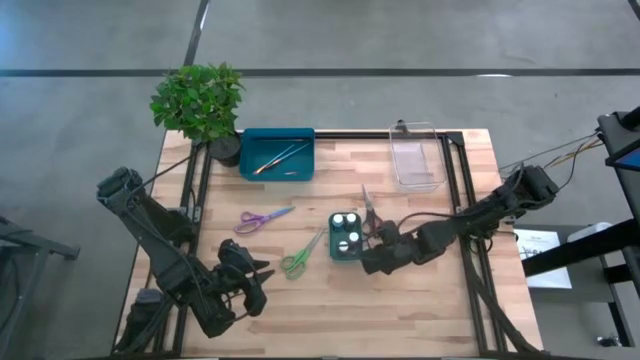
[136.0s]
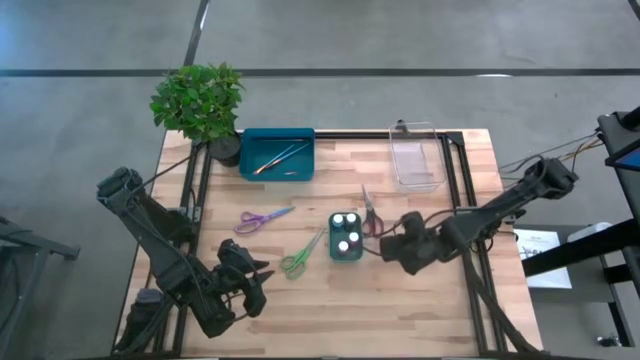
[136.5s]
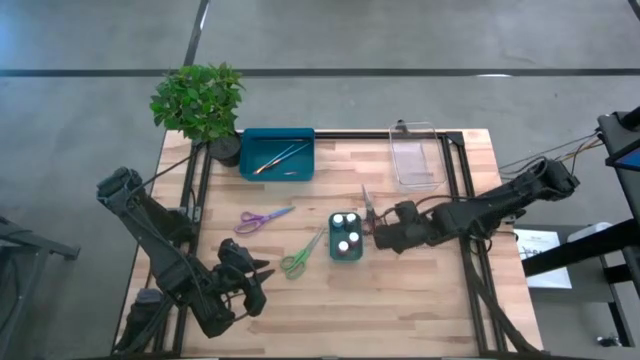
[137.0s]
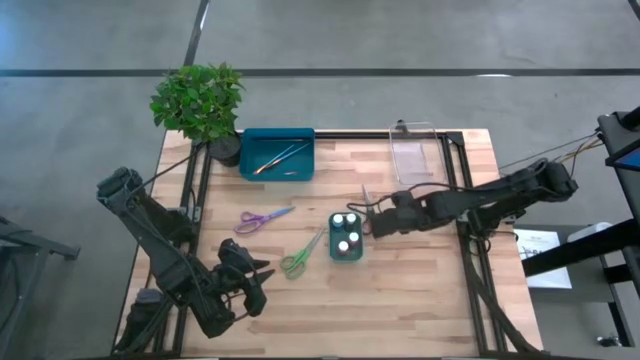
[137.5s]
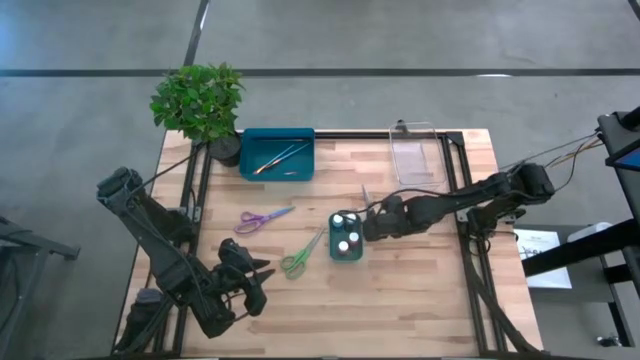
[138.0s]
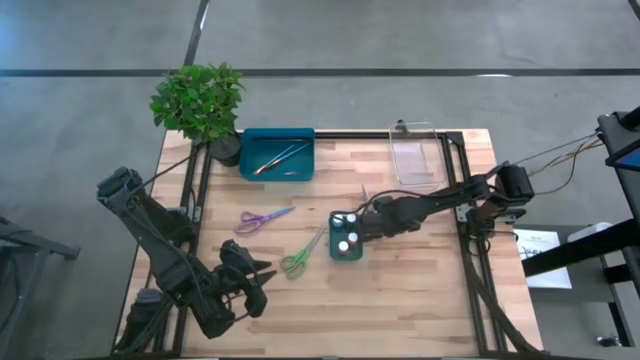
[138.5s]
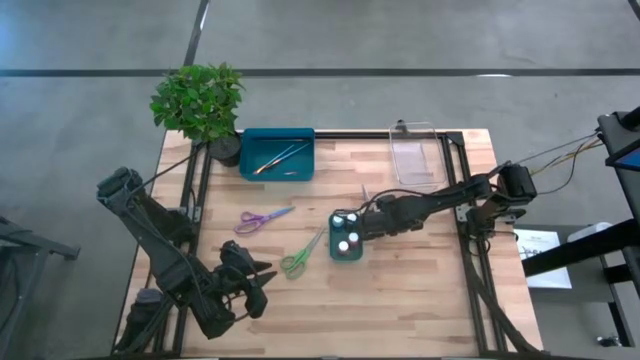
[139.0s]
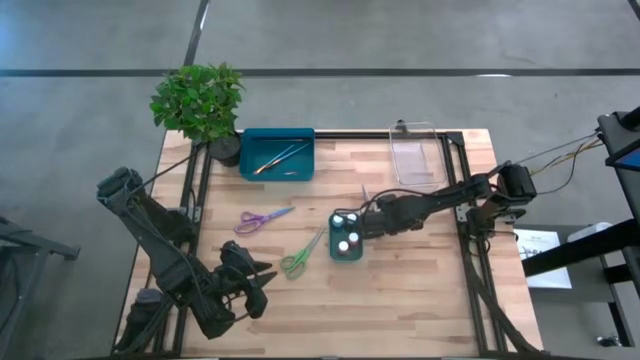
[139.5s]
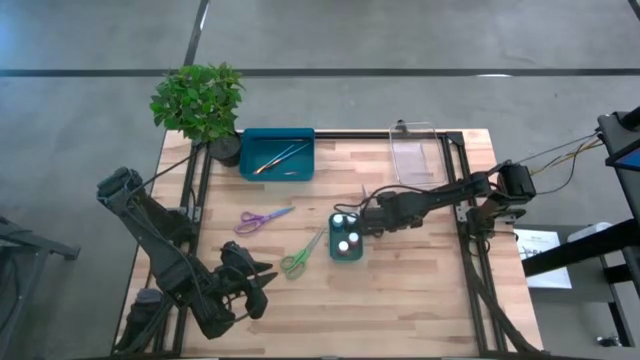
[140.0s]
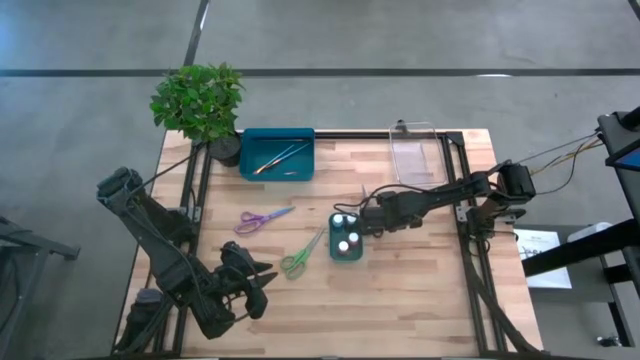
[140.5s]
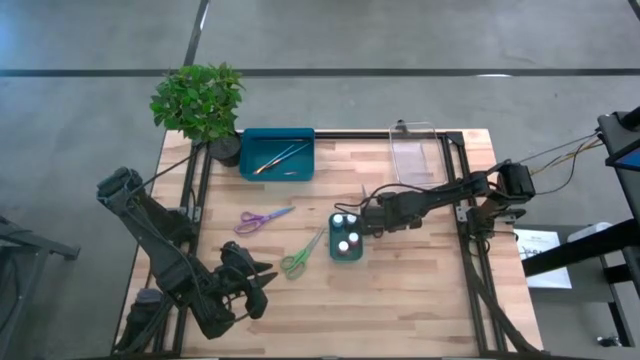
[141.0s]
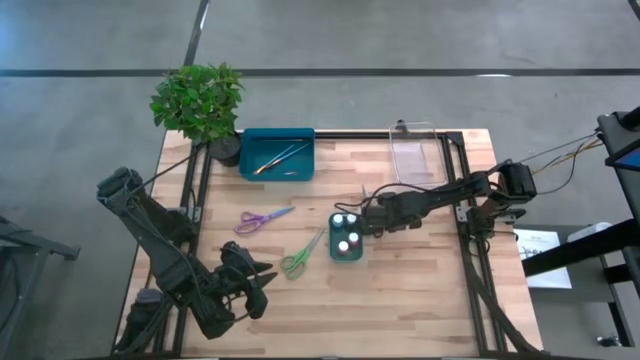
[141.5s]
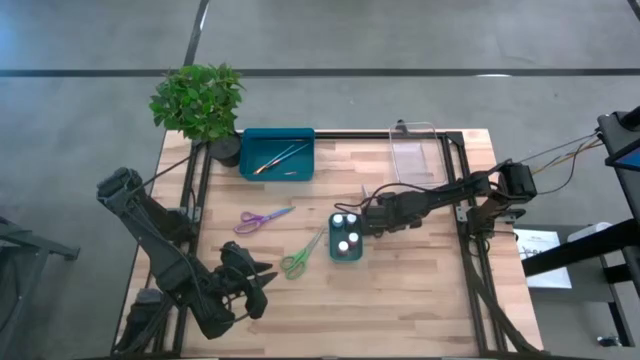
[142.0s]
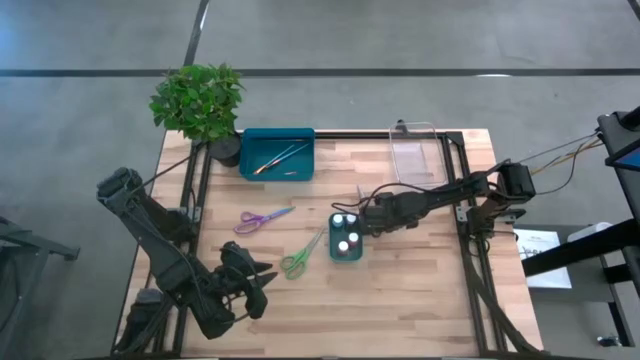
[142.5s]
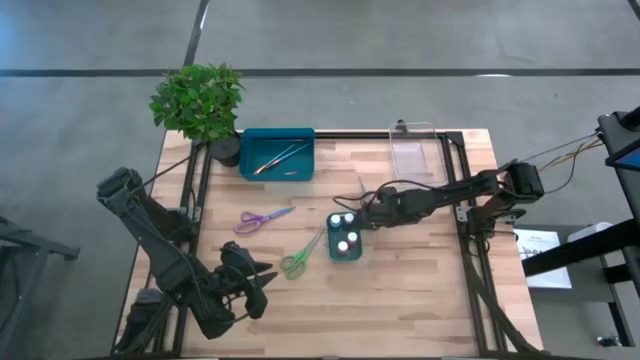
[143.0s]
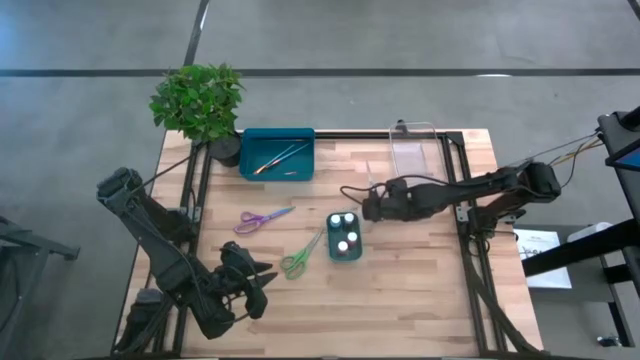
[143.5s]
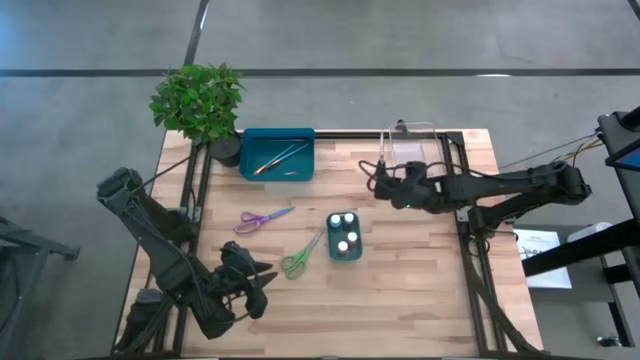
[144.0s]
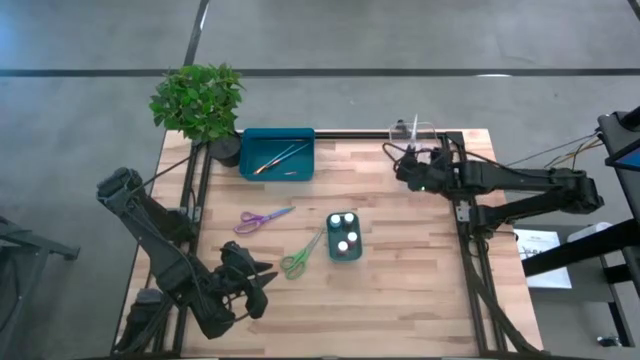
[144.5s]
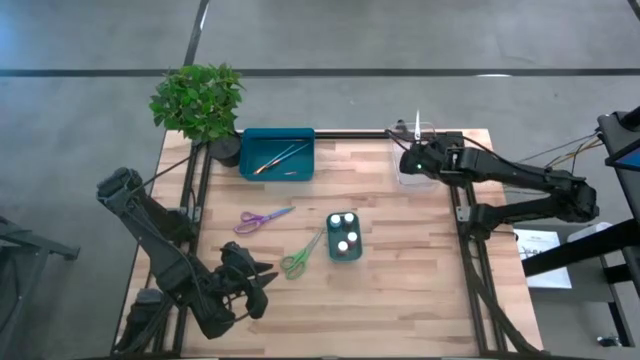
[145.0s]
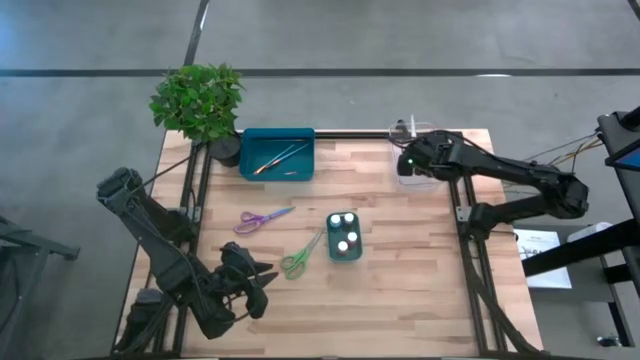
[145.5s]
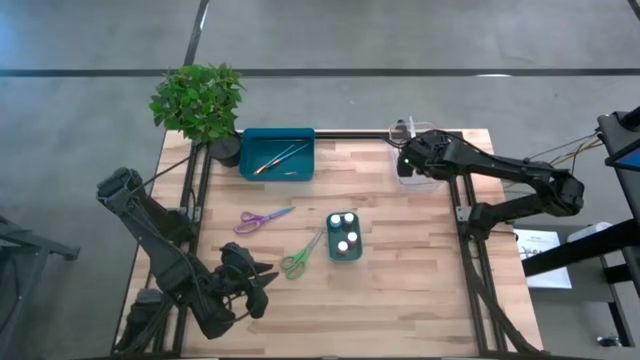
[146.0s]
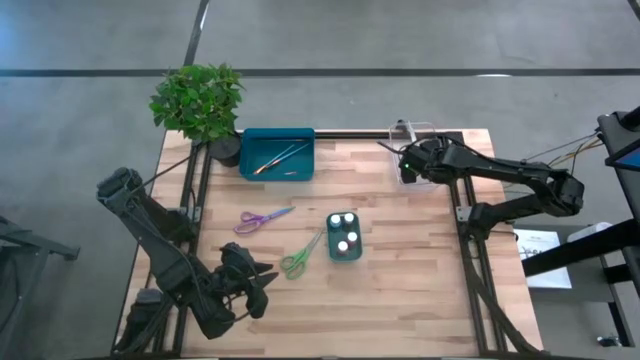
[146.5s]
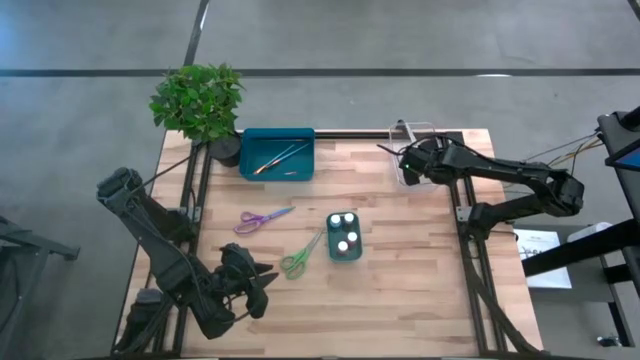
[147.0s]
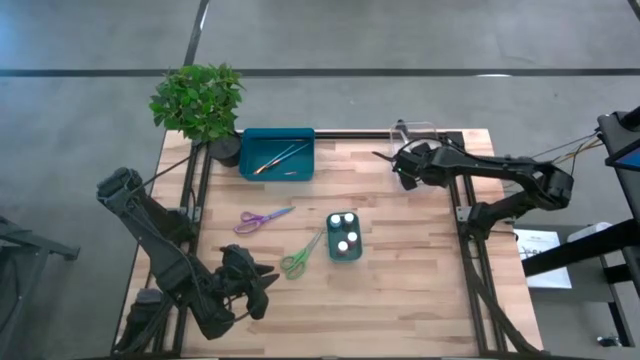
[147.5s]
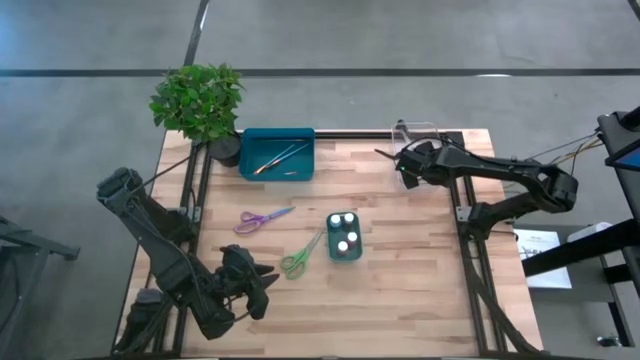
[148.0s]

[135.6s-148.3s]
Task: Pick & Place Paint Supplies
Put the right black scissors into the transparent bin

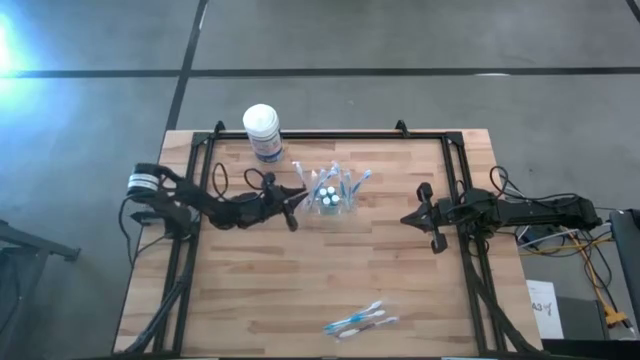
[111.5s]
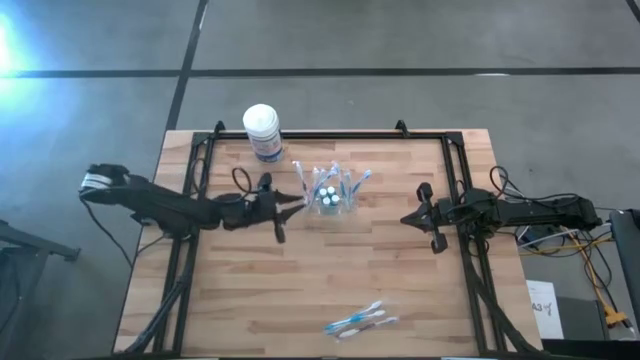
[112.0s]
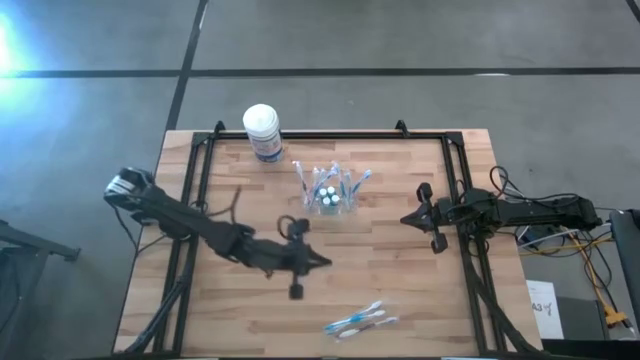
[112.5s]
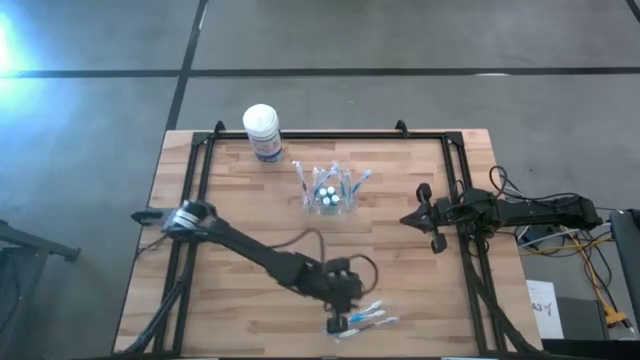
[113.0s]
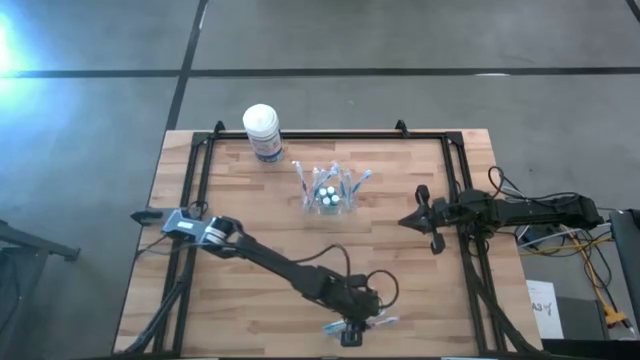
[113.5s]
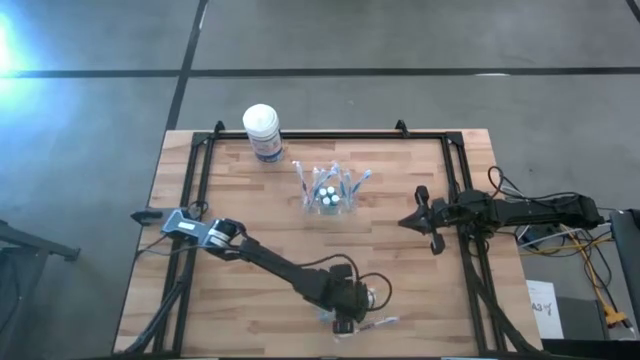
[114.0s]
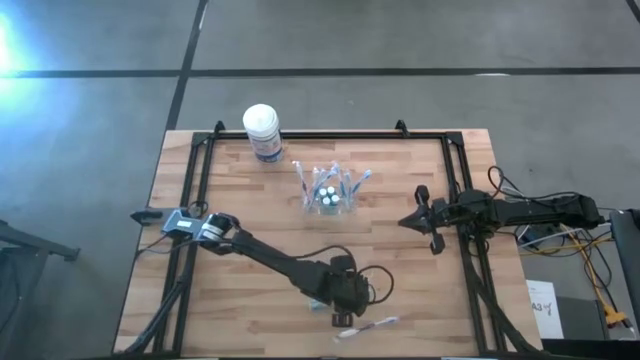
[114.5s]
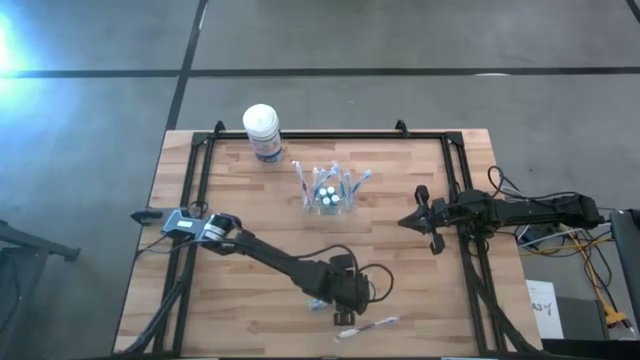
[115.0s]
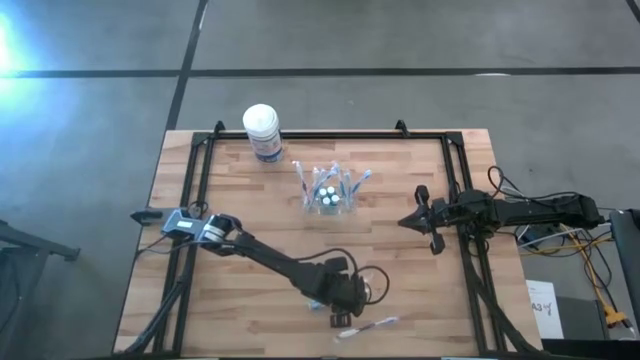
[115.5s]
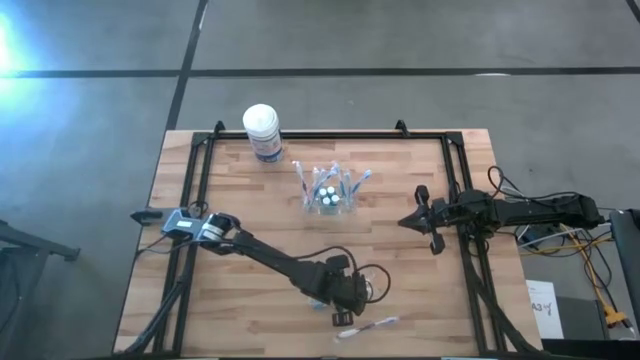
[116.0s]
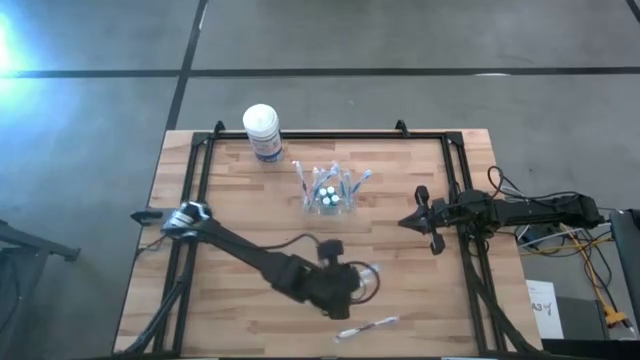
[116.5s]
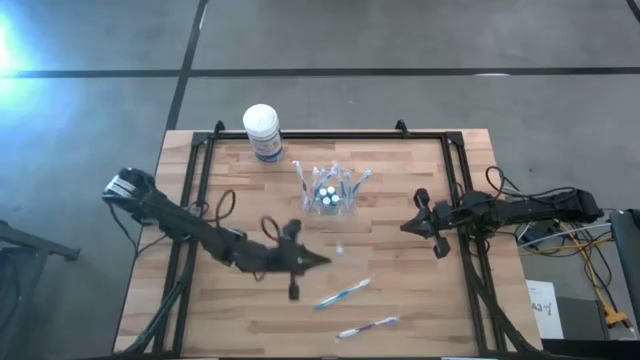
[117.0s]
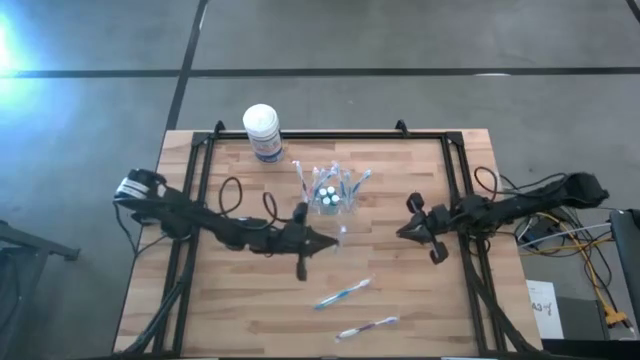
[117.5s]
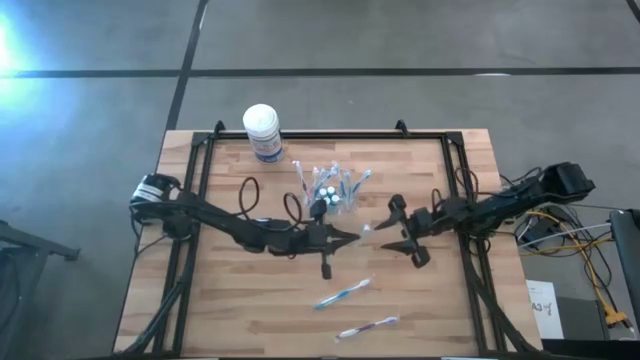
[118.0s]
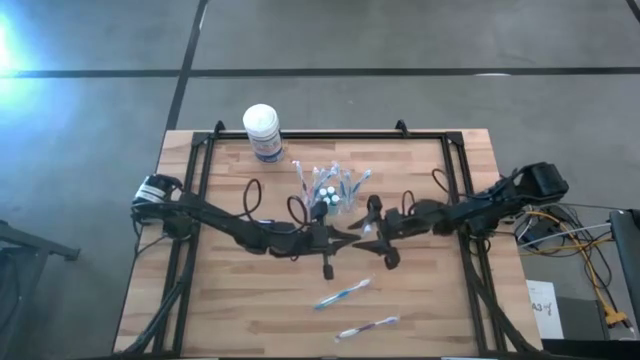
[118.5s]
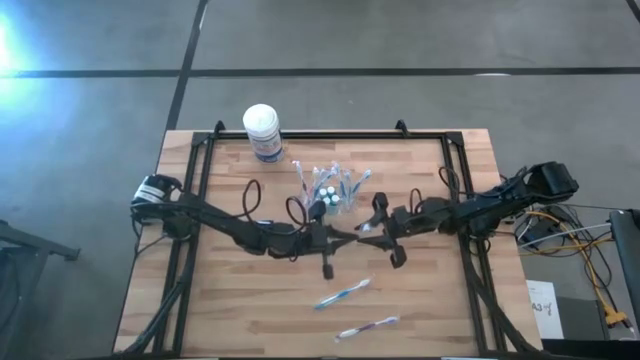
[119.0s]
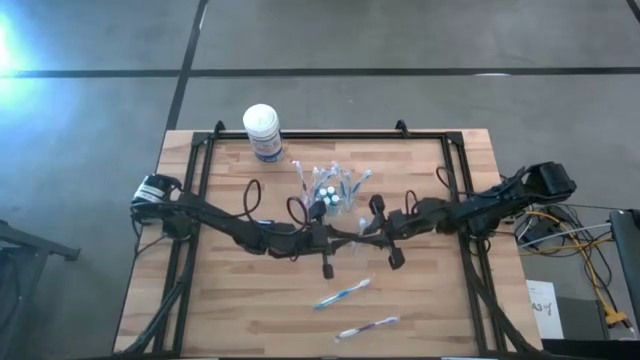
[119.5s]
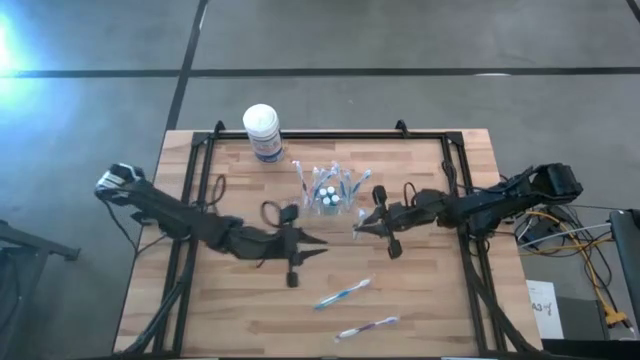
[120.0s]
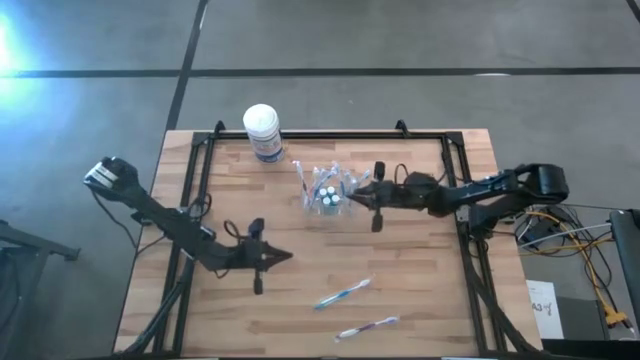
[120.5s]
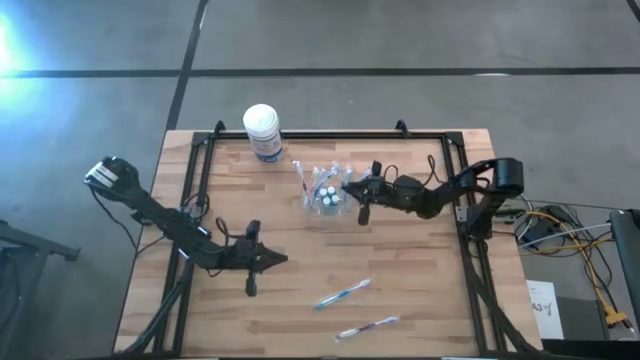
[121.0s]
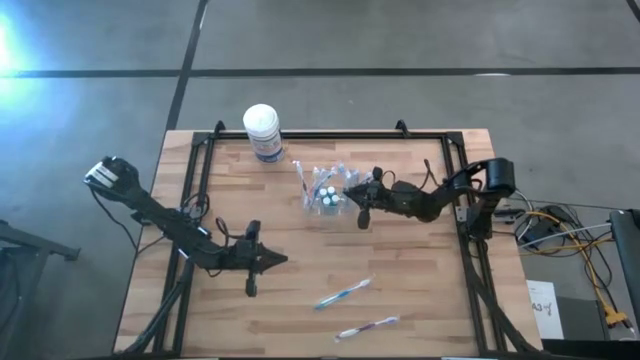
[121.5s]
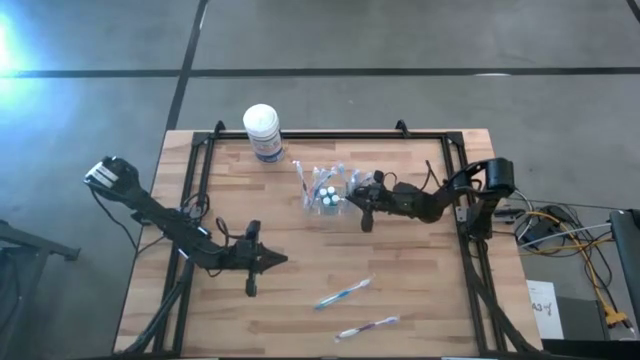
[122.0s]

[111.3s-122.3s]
Task: Pick & Place toothbrushing station
Put the blue toothbrush into the transparent organizer
